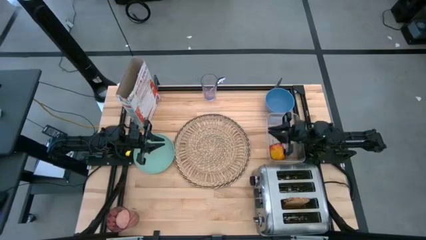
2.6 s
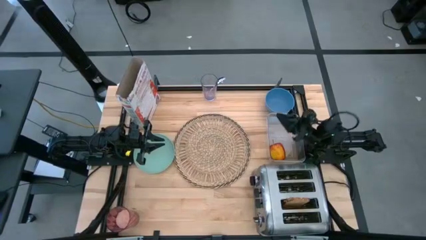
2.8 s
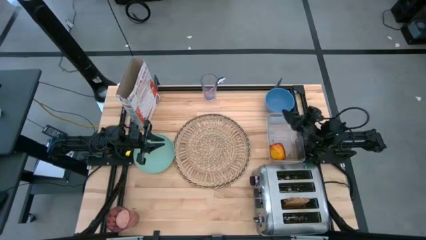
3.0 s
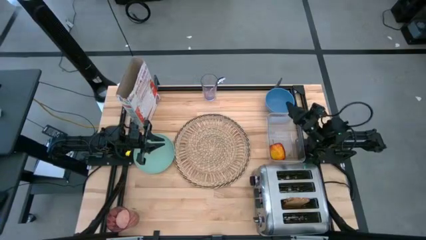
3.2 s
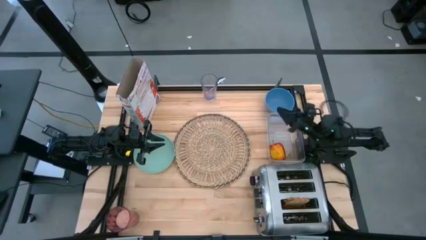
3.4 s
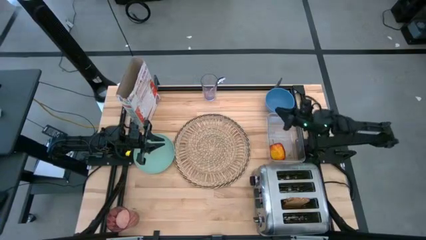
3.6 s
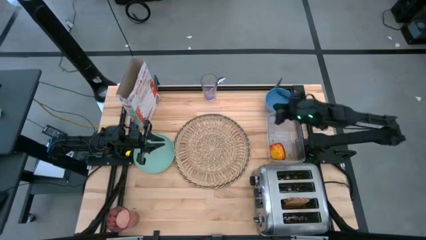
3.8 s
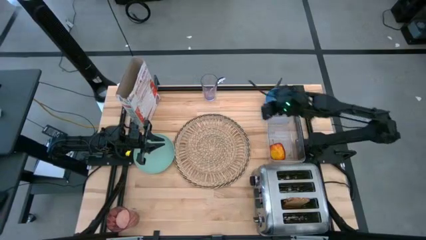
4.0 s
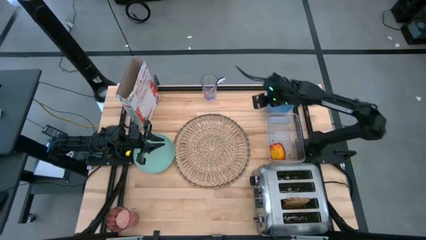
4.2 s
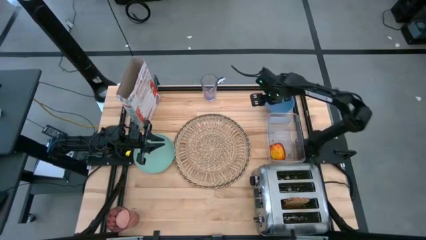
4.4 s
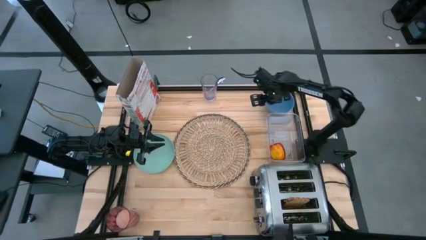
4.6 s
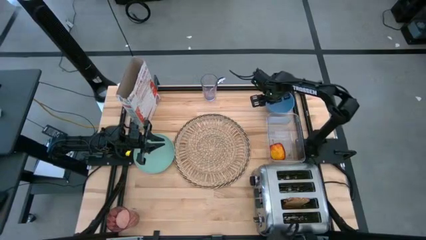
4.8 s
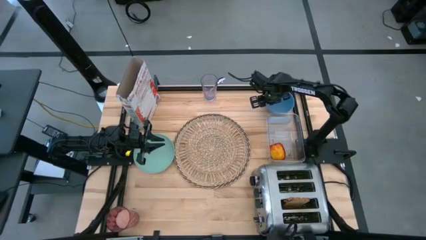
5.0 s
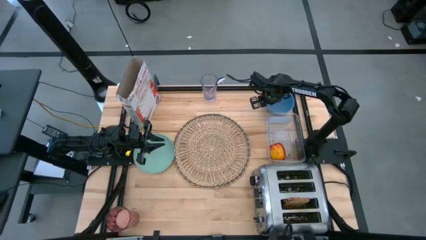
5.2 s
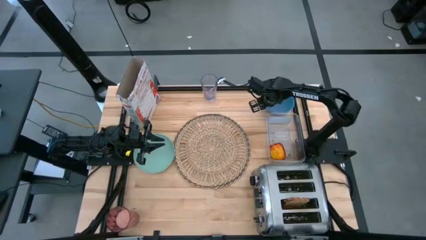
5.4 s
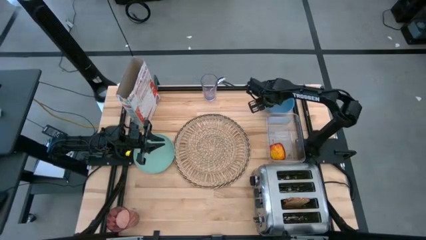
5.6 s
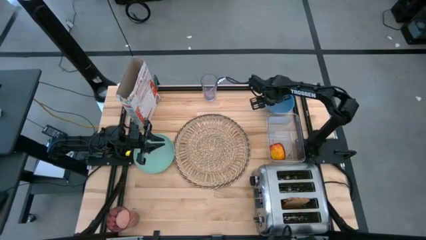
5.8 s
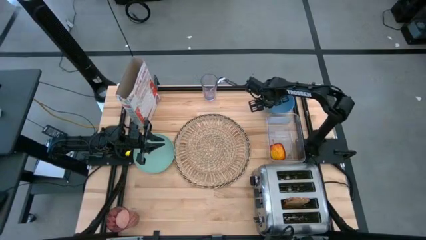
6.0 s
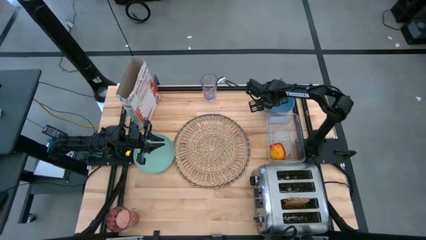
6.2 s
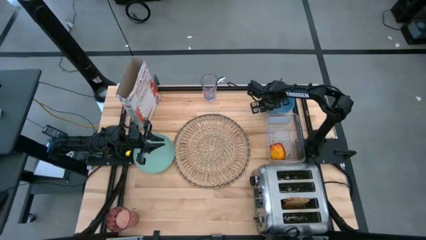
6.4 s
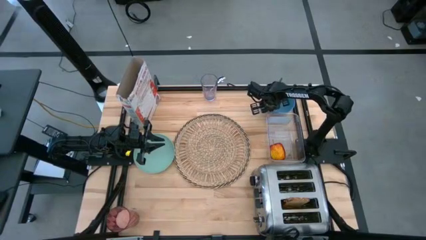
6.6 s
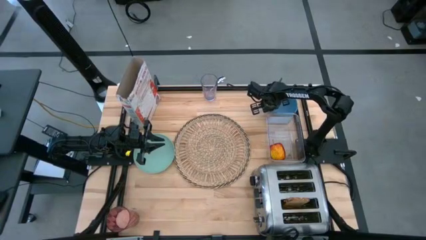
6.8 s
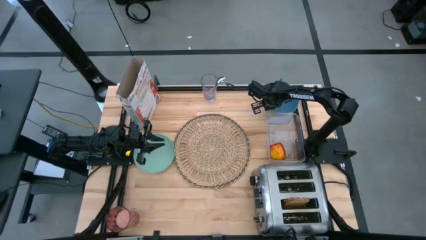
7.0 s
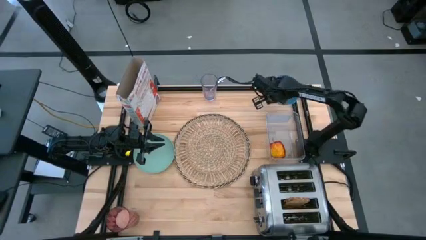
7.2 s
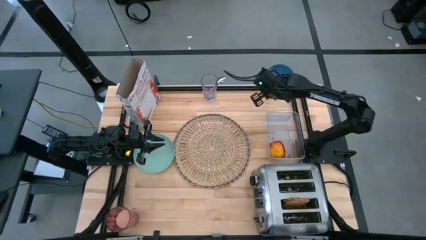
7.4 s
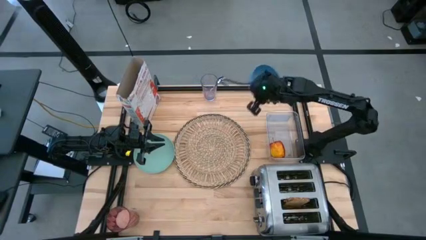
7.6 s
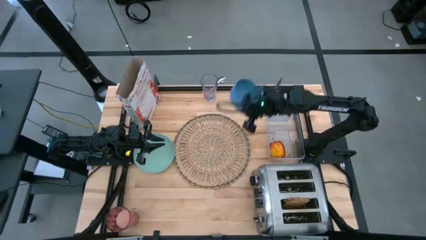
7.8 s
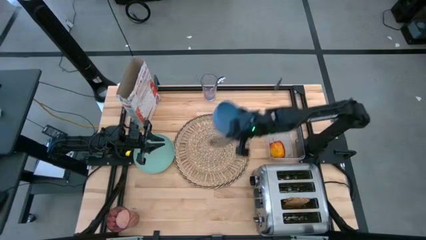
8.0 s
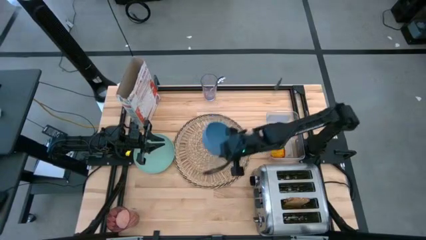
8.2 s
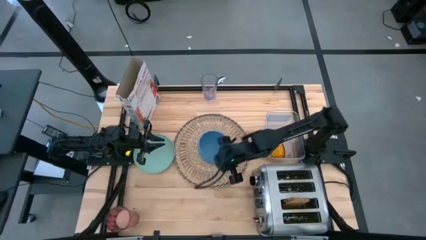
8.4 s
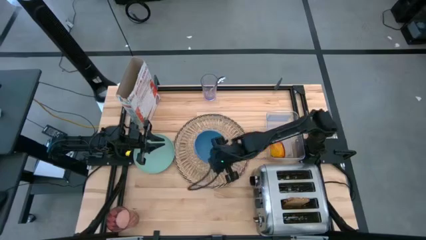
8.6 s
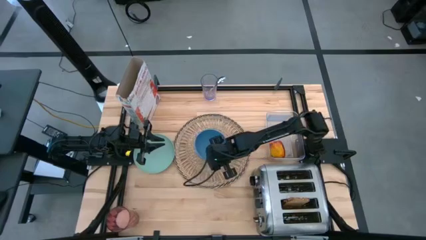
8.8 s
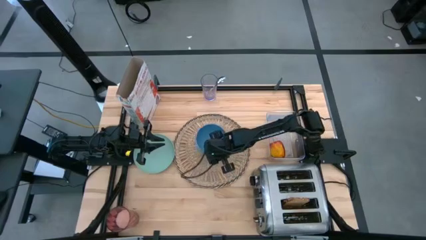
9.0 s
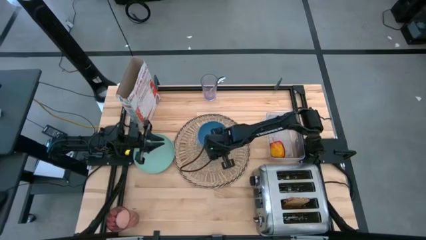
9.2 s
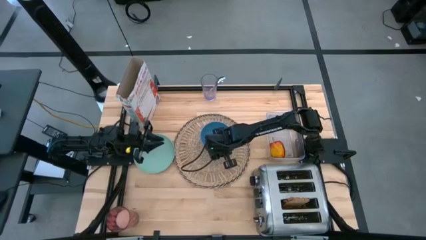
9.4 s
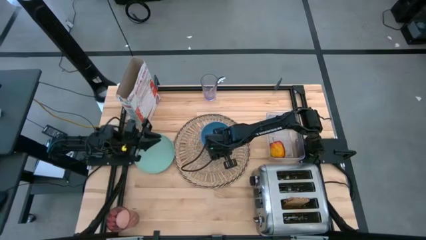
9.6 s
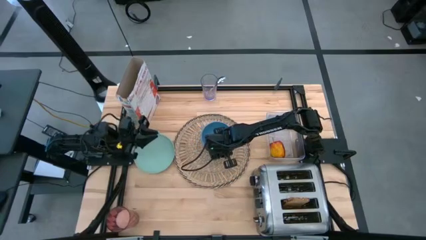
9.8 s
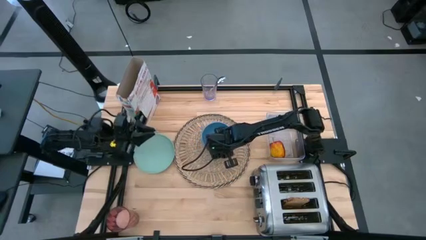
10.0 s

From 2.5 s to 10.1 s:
Task: Arrange a breakfast setting
Put the bowl on the table mat

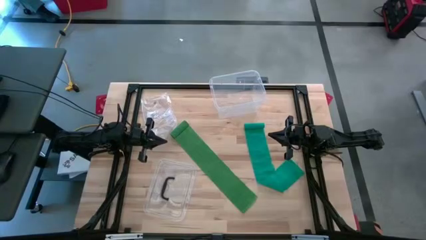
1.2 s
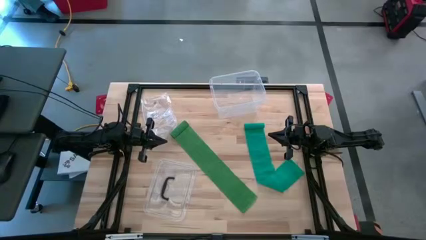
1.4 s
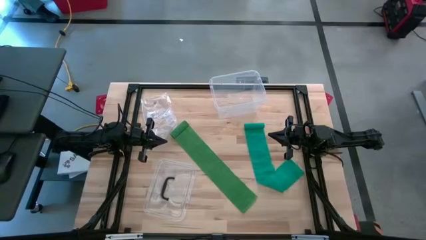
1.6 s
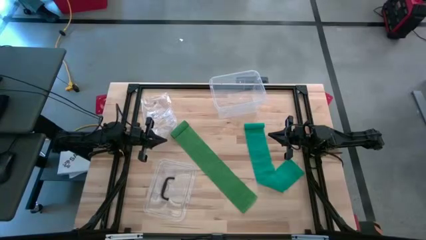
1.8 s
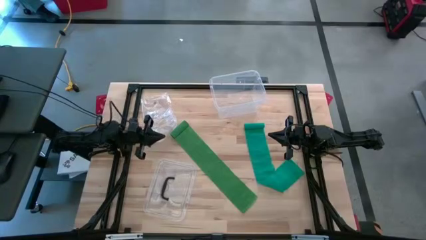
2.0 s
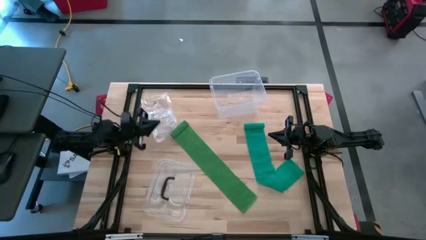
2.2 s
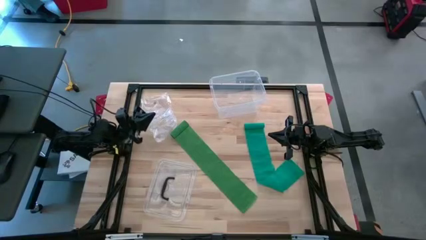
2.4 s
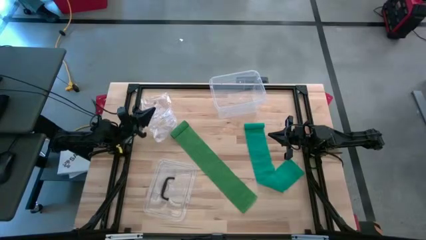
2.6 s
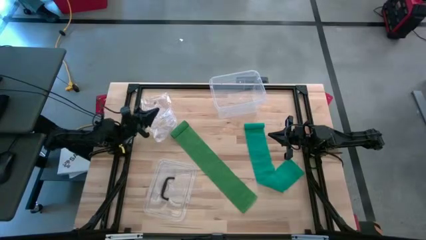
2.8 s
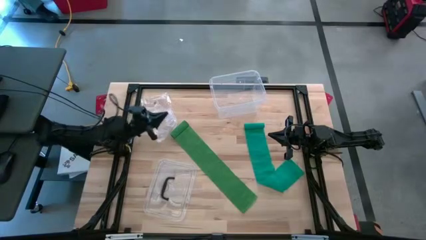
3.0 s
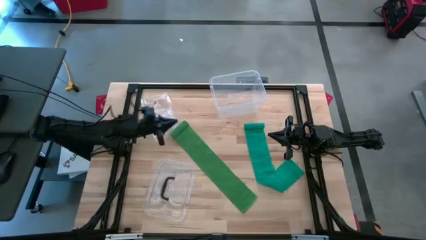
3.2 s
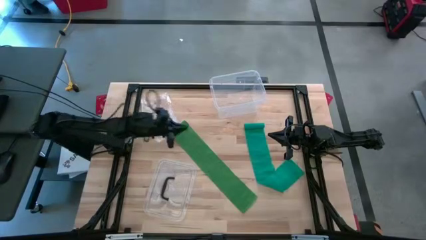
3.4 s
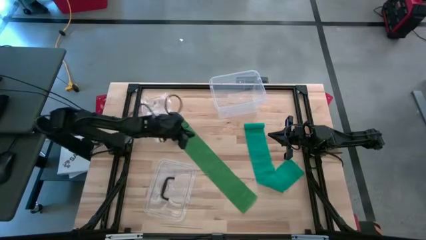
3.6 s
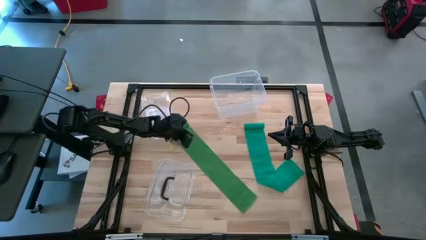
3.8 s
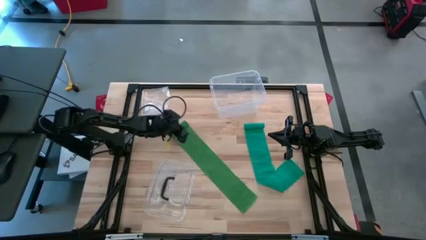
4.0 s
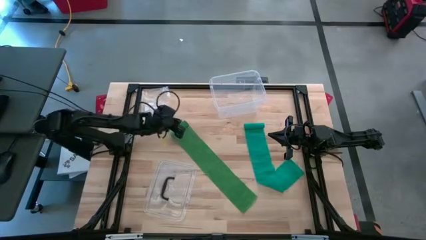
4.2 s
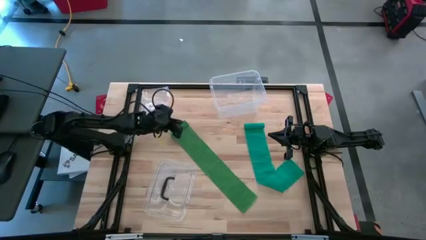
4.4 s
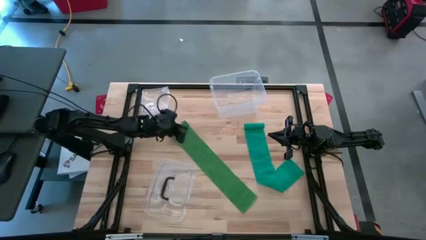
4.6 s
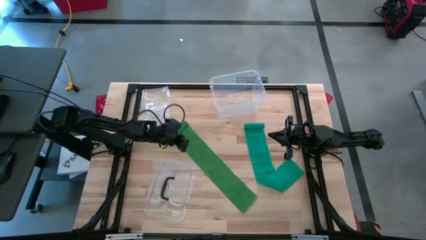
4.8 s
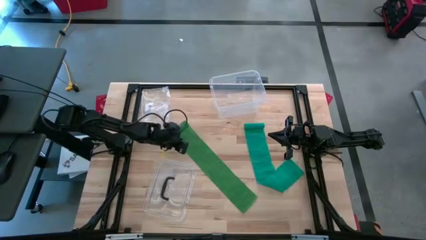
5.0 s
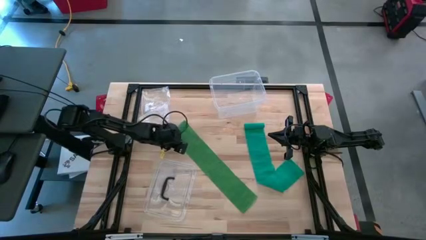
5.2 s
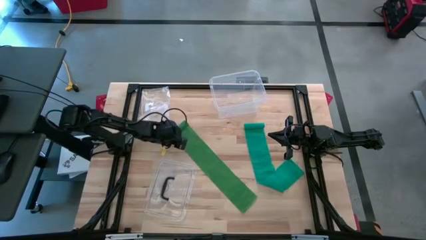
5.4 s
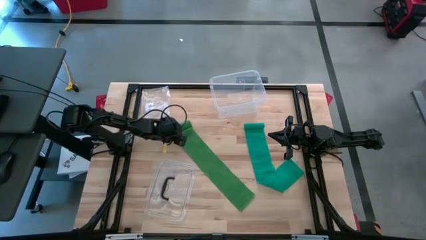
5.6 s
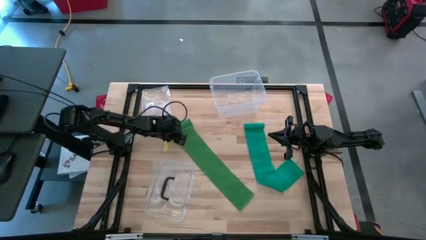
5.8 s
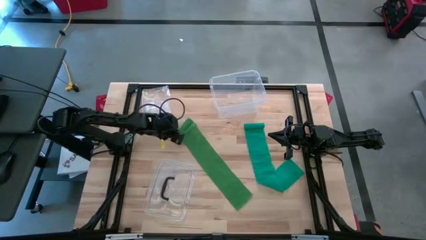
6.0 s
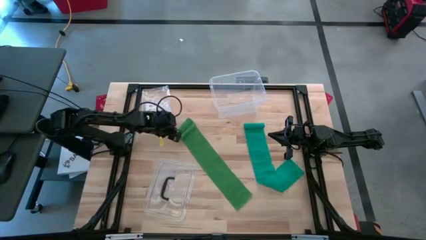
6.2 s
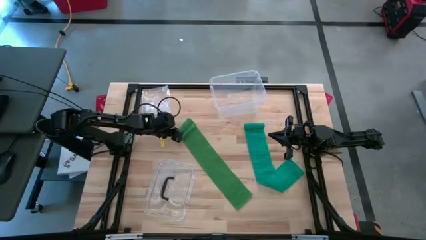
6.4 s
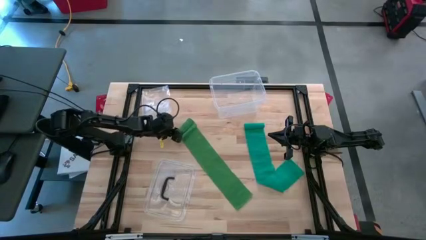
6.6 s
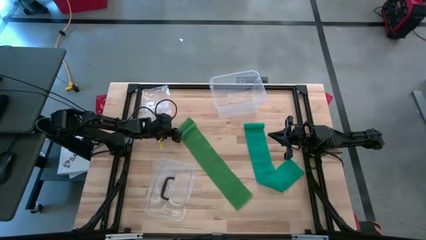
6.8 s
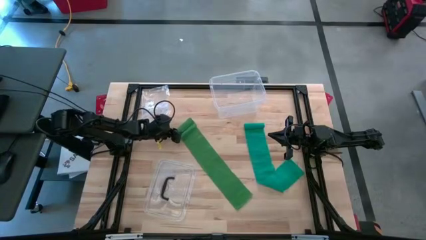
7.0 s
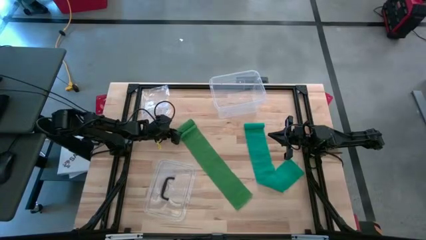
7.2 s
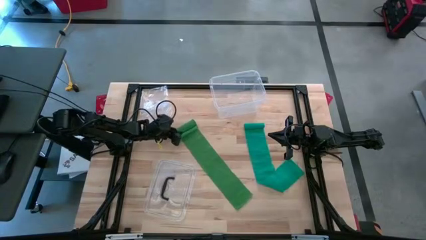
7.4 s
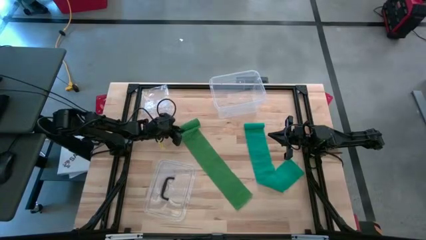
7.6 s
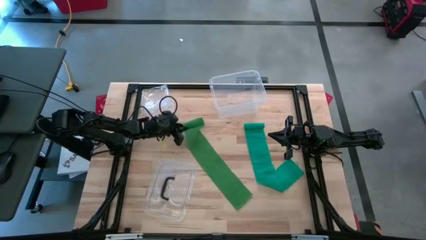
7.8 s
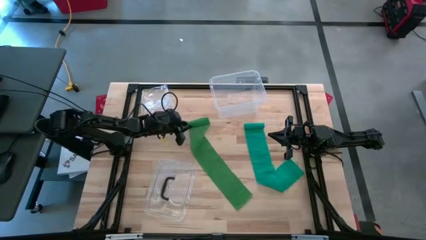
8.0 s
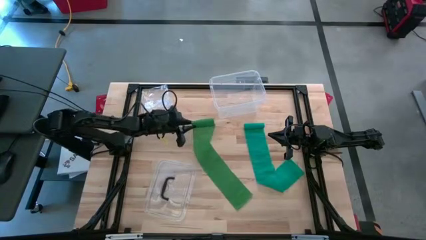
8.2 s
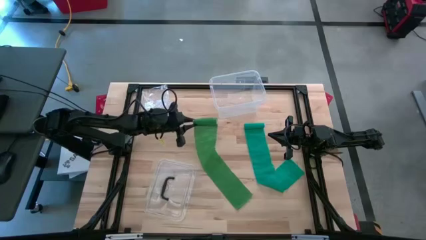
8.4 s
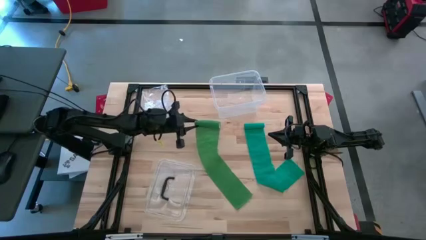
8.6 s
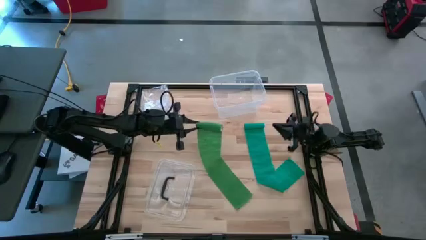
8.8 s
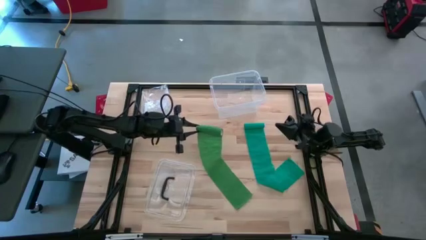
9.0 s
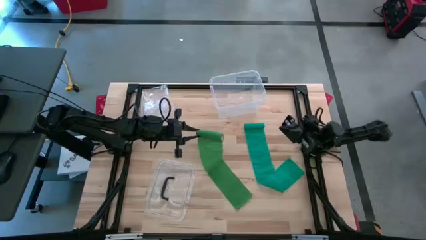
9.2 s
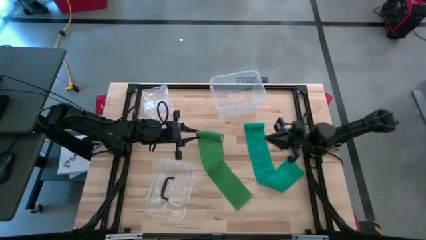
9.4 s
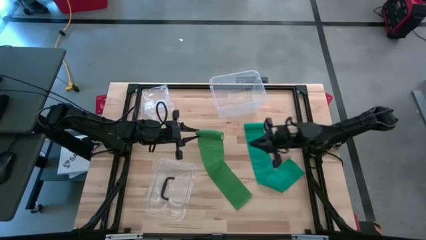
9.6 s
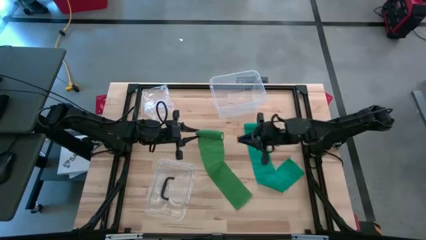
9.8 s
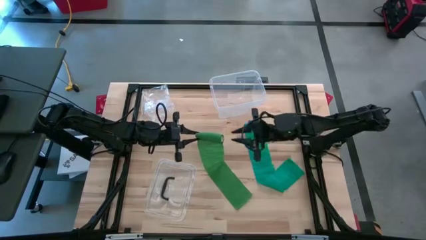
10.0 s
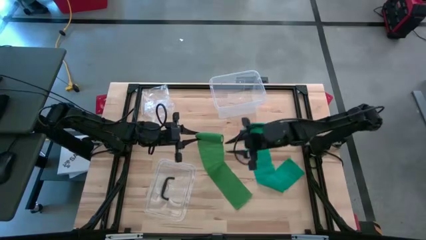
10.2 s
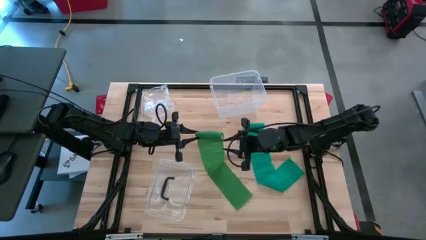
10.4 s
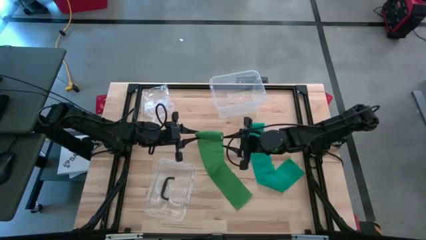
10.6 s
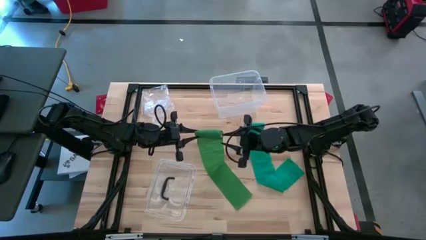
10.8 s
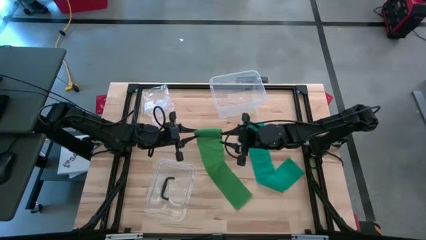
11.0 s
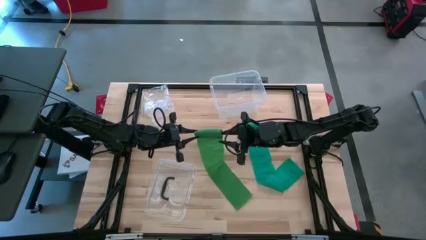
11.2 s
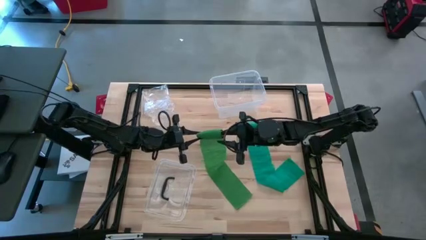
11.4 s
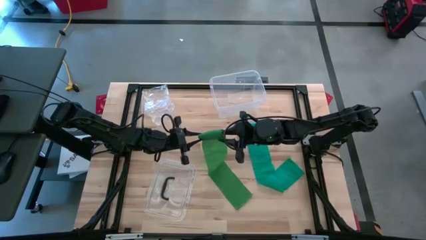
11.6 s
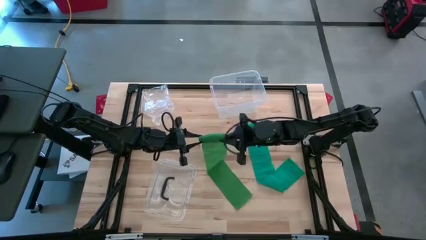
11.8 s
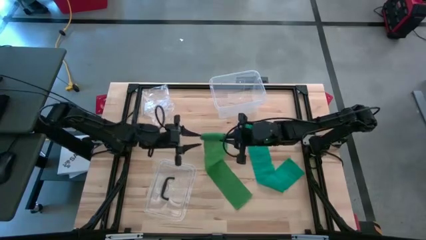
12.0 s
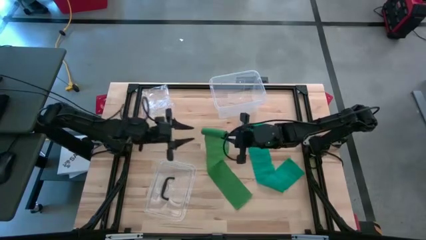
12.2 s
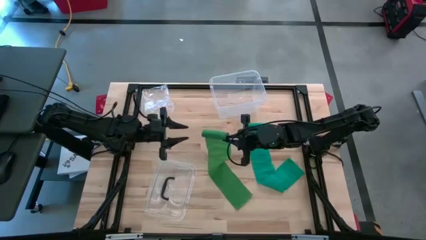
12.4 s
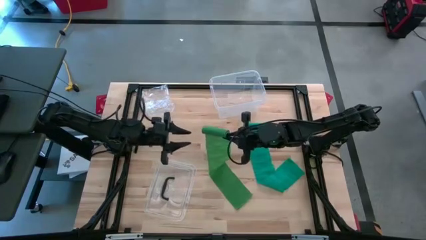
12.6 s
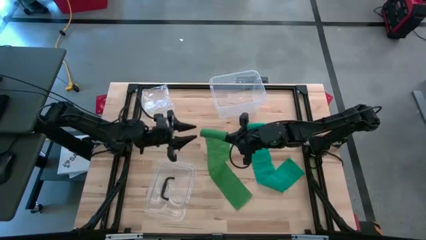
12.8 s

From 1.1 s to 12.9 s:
Task: Roll bandage
Roll the green bandage
